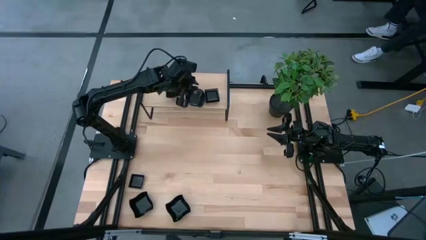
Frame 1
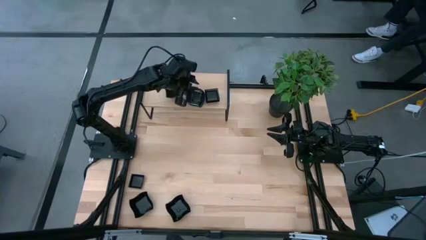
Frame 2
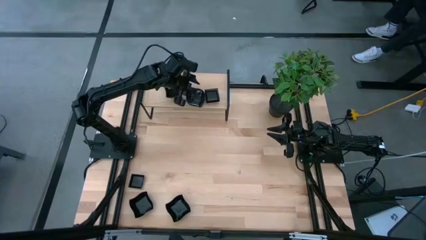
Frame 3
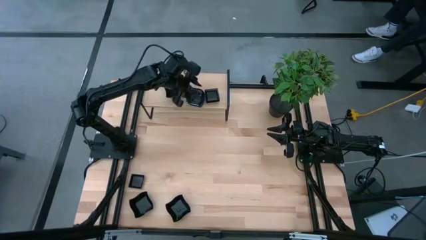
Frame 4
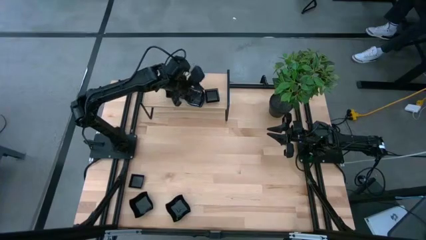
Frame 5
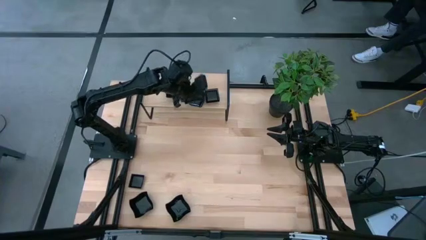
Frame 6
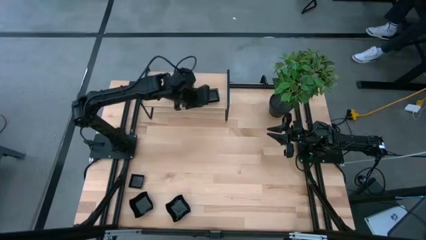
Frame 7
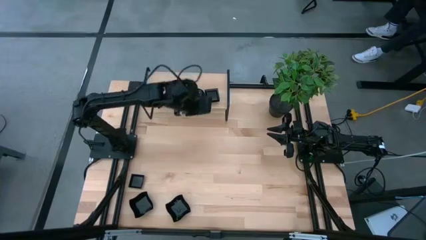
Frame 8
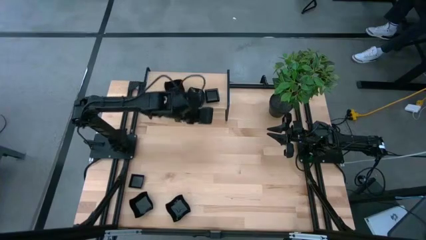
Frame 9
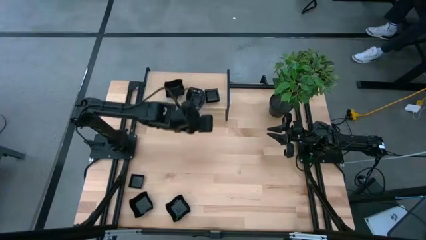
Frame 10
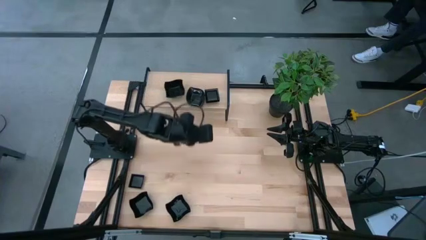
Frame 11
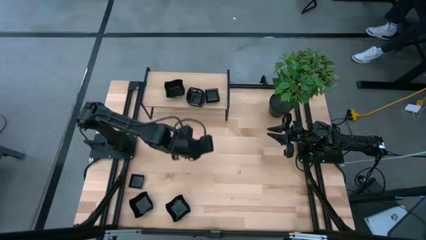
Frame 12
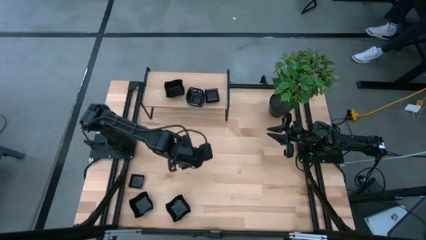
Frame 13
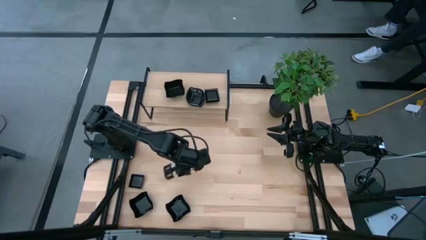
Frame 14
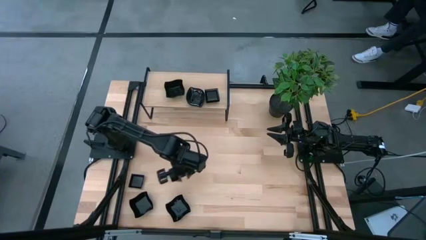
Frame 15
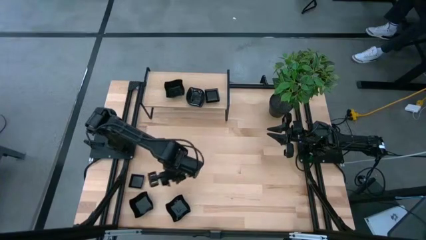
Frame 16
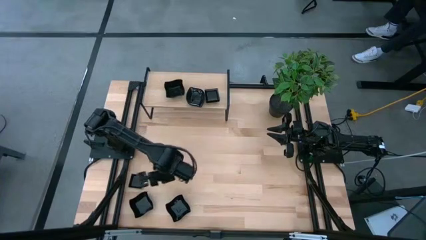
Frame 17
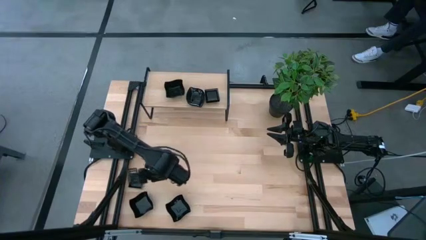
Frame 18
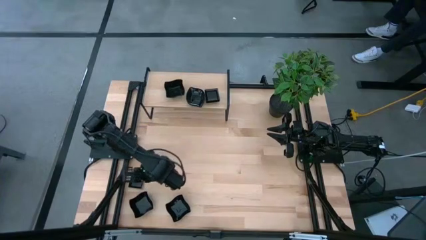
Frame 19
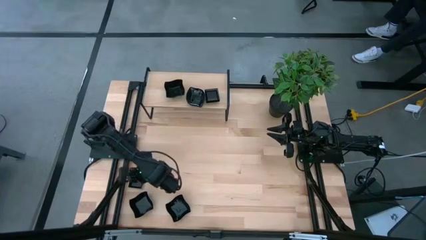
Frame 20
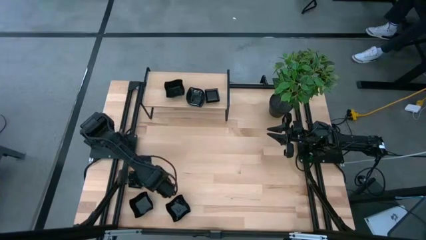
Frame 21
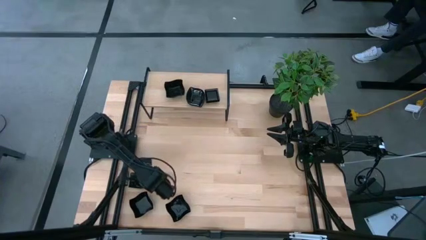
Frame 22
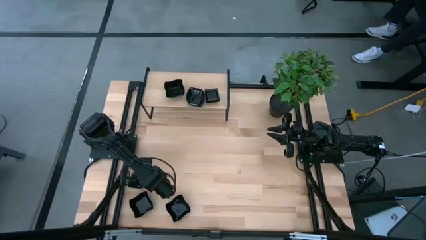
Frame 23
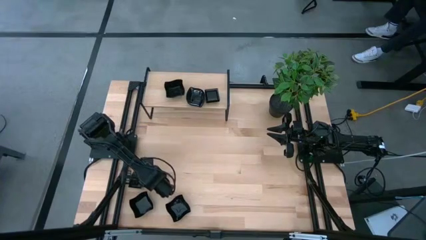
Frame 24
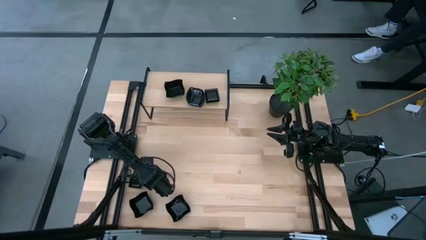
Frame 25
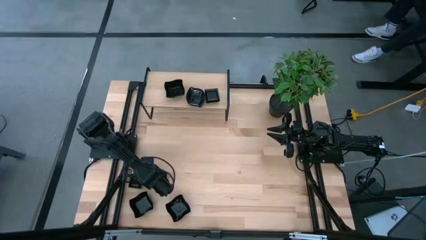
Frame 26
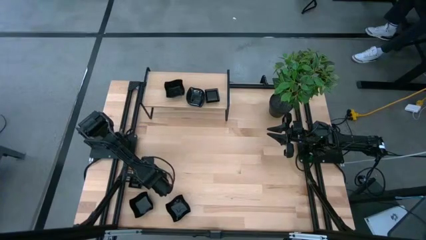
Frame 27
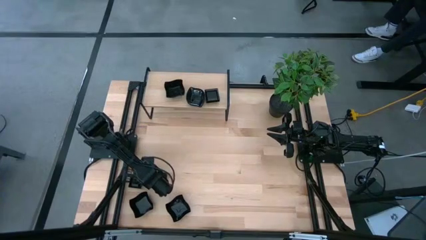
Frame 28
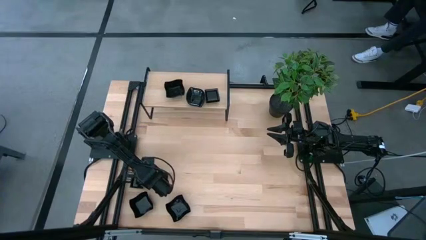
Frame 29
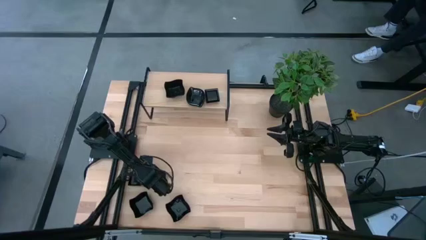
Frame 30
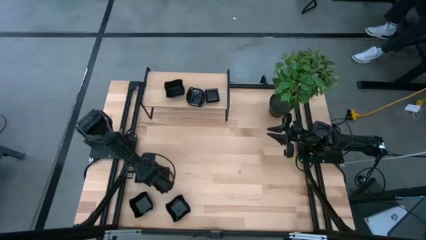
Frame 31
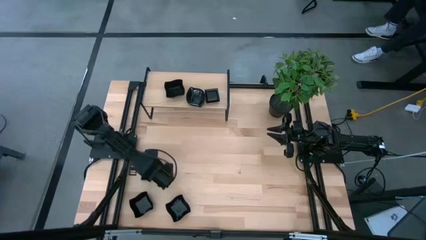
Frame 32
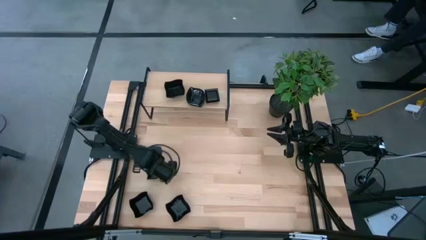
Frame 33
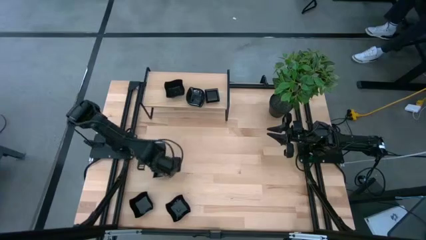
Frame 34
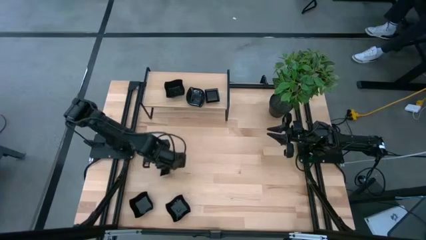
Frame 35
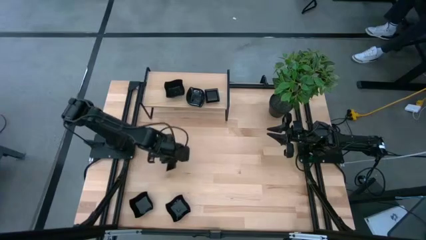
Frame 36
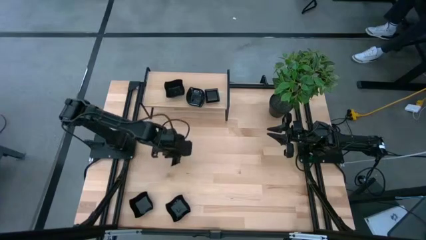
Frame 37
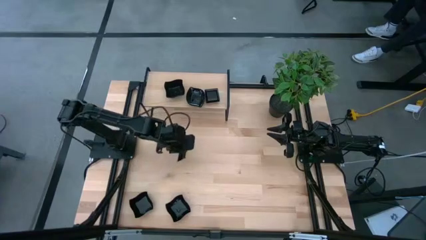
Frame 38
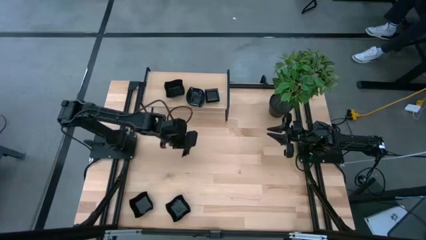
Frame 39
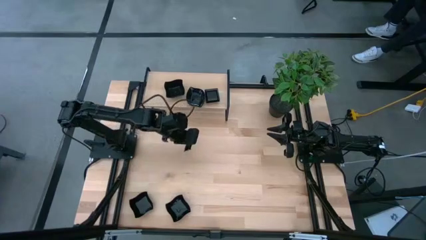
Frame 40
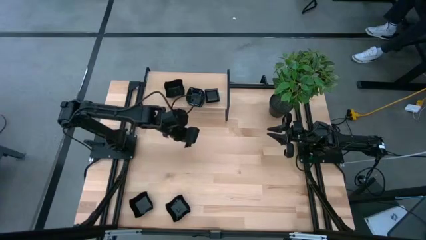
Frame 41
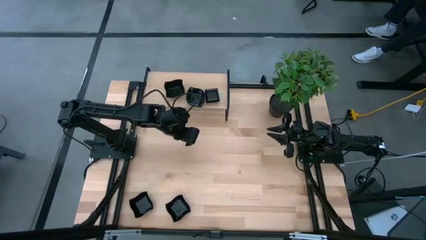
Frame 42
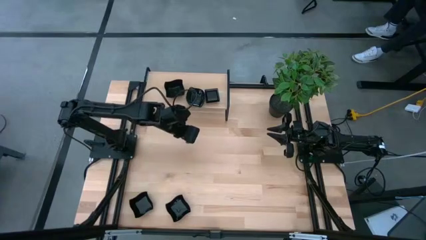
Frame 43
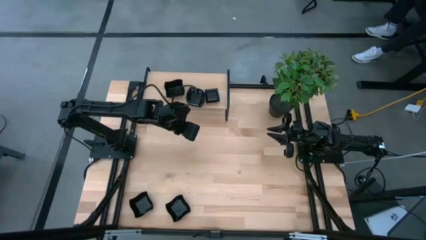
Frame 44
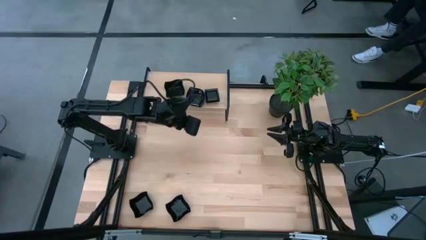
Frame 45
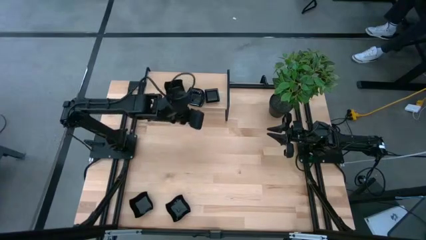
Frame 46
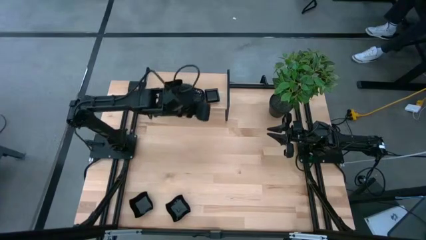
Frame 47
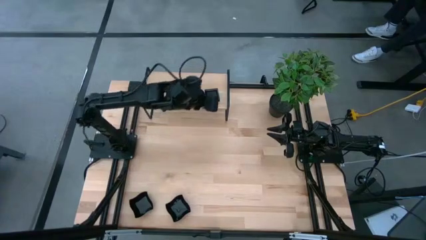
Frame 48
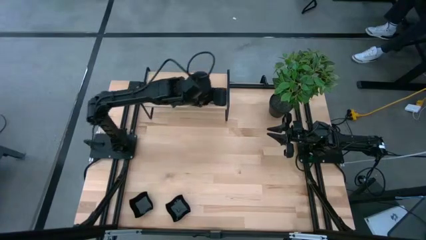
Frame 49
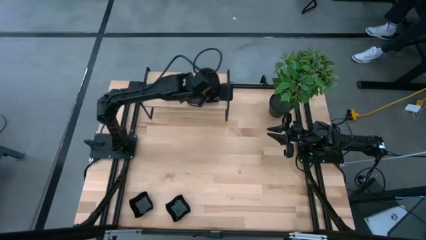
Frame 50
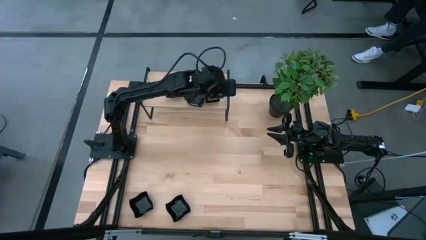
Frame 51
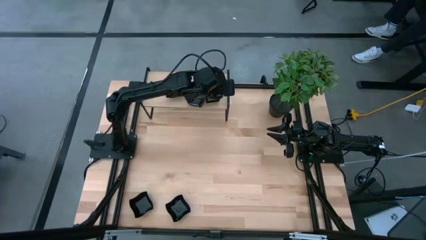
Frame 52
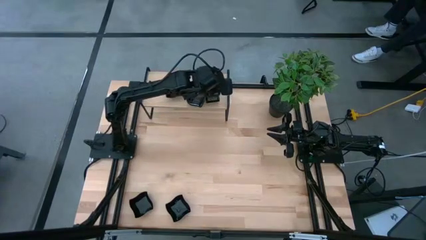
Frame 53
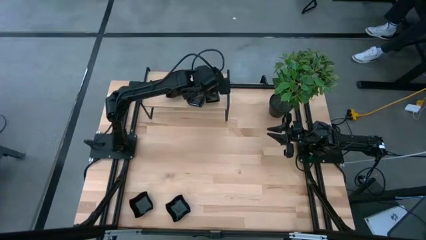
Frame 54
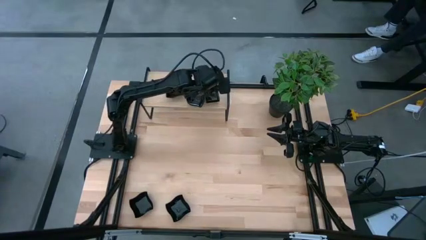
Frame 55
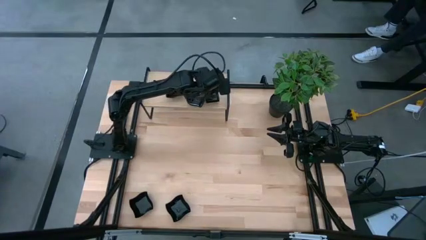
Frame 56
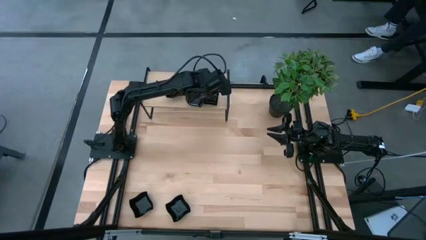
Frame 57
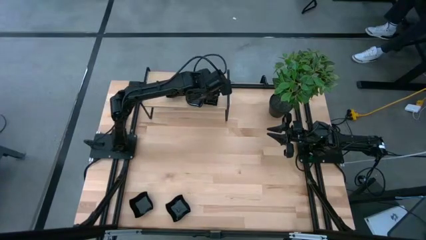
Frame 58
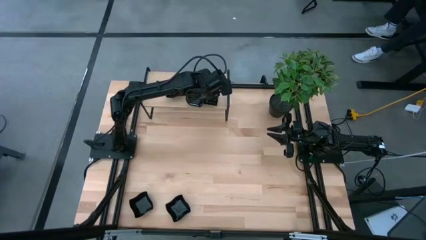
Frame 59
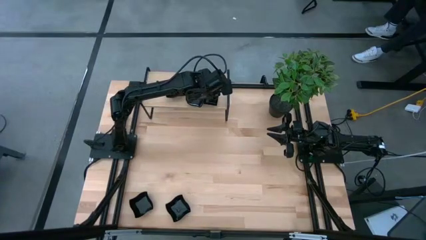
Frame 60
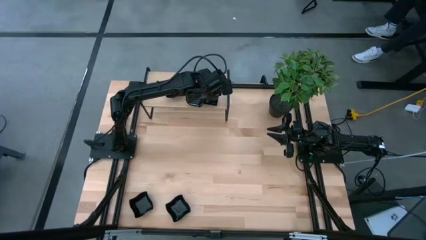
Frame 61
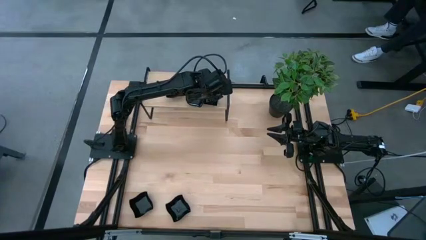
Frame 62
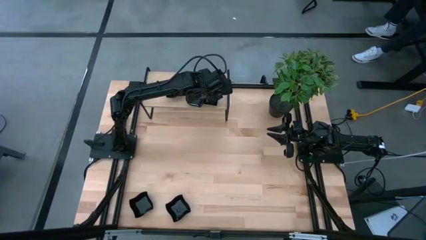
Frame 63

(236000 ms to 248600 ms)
Task: Pick & Place Mini shaped plates
Stack the square plate on top of the square plates on the shelf

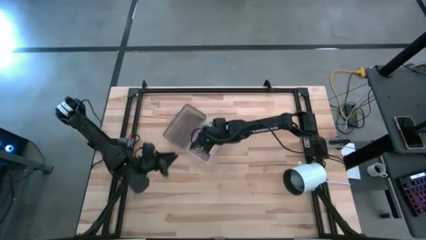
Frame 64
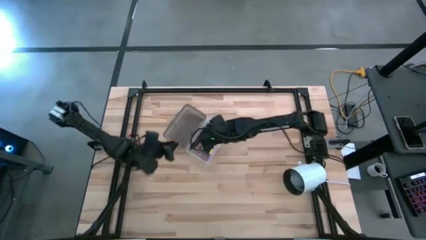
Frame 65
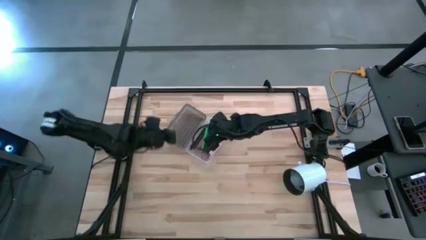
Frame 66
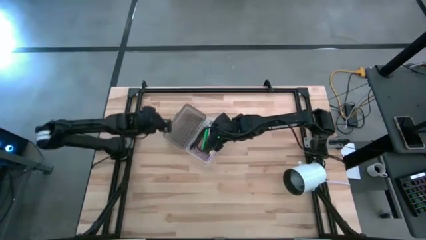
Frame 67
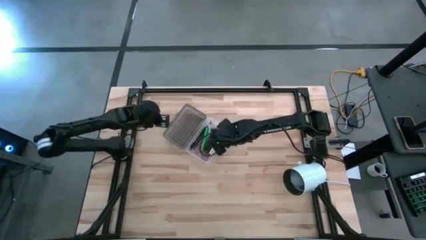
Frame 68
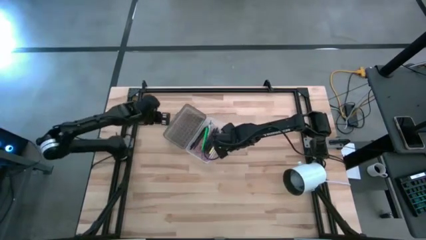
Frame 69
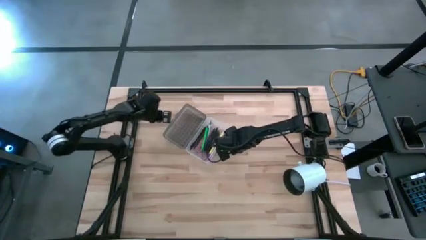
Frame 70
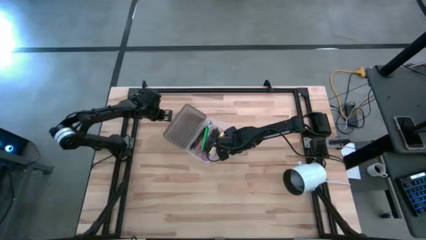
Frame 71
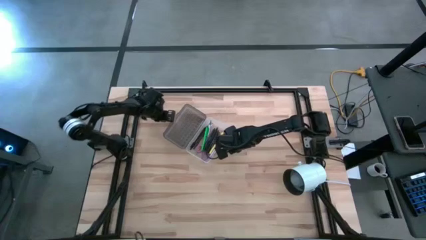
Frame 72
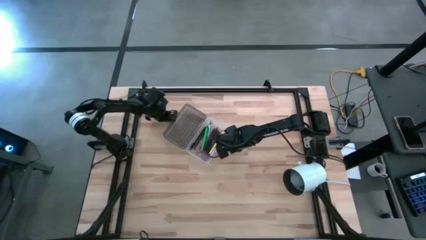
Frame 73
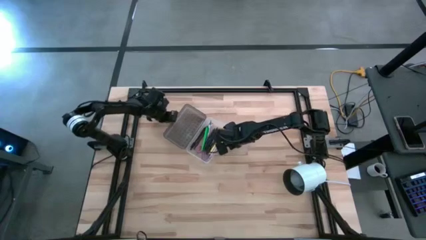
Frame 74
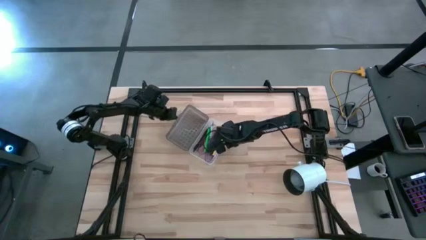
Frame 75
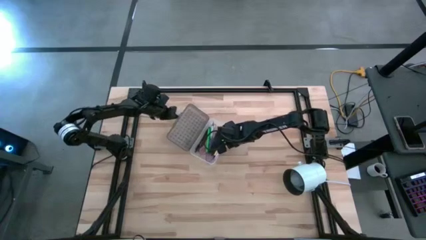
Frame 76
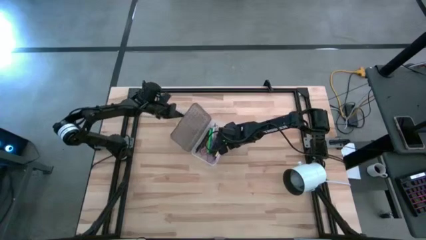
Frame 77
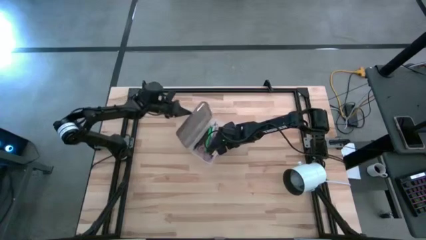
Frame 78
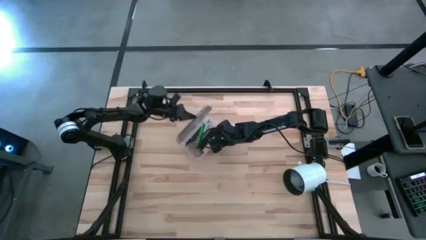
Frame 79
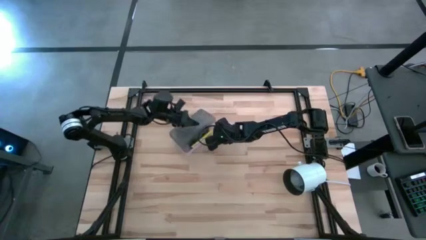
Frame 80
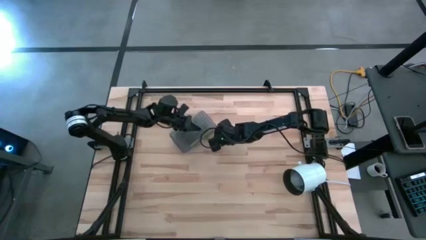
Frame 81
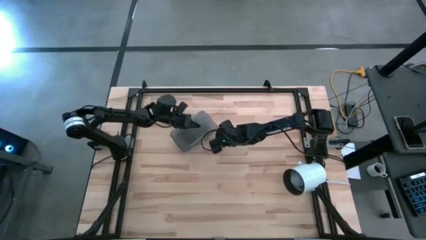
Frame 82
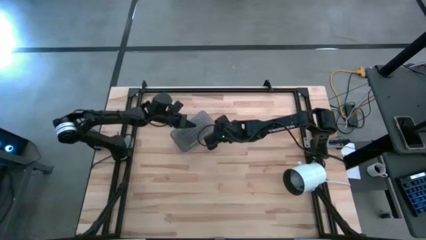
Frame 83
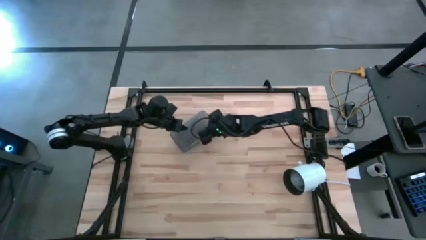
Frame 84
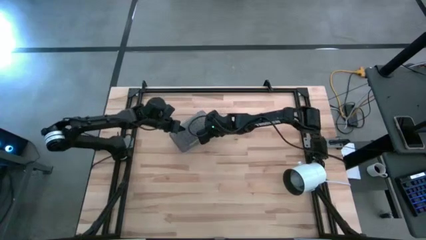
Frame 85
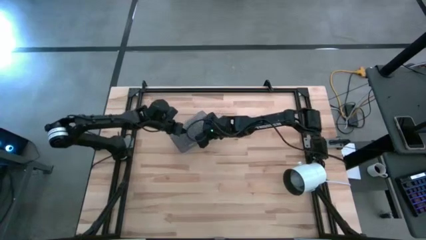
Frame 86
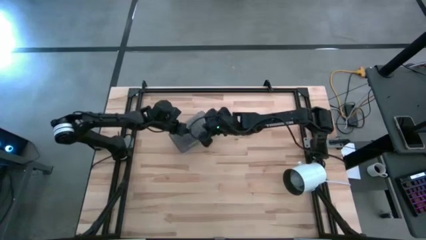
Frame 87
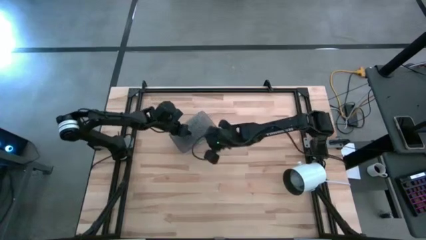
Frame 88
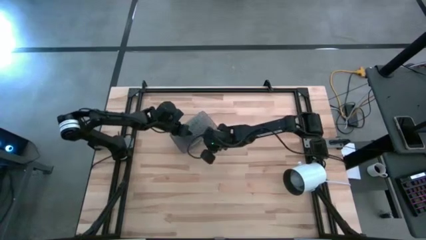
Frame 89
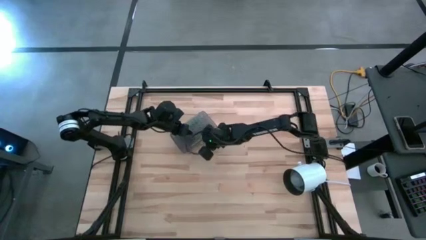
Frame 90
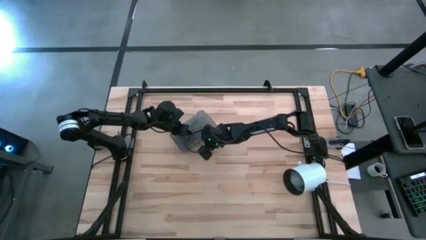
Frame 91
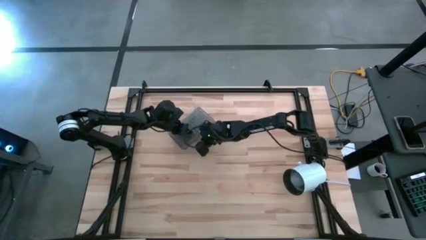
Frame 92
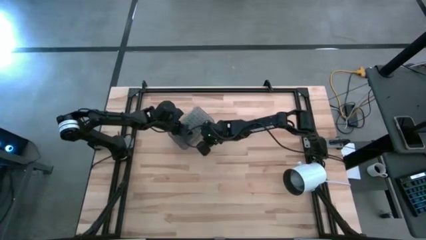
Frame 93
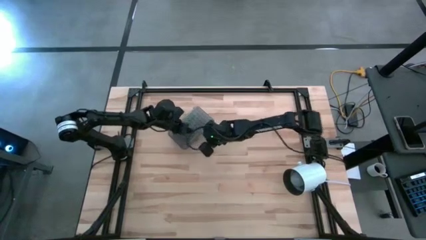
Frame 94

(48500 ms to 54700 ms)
Task: Pick & place school supplies into a supply box
Close the lid of the black supply box
